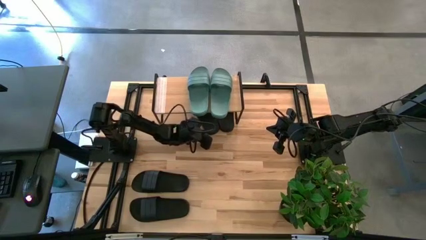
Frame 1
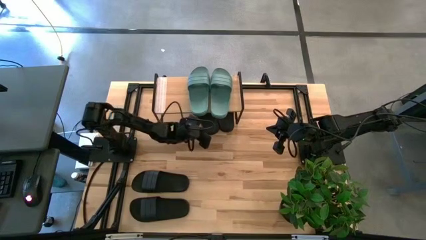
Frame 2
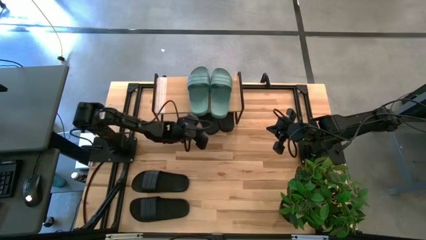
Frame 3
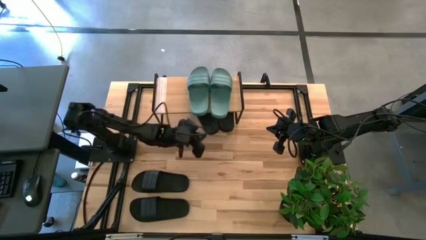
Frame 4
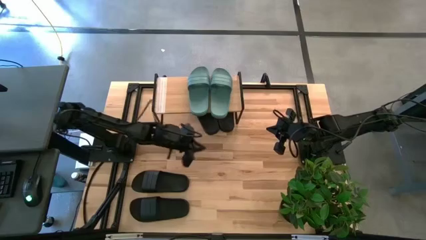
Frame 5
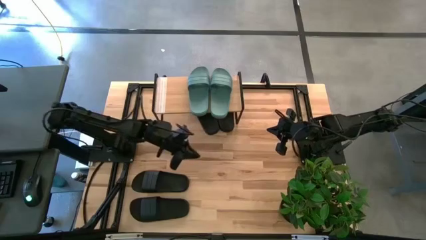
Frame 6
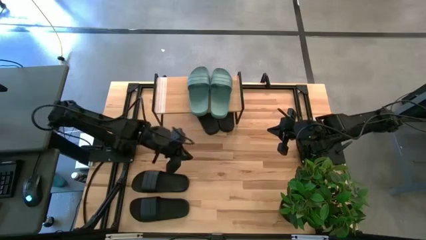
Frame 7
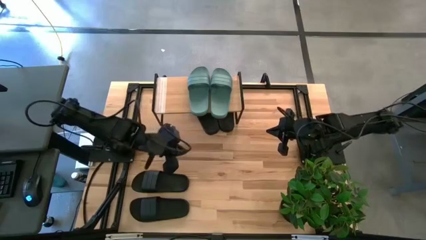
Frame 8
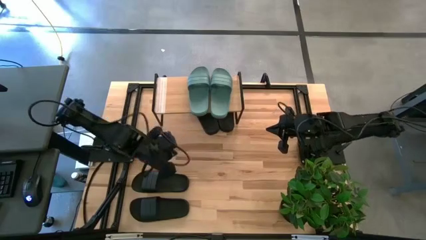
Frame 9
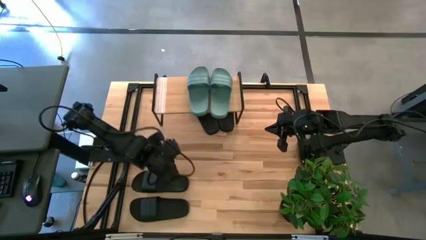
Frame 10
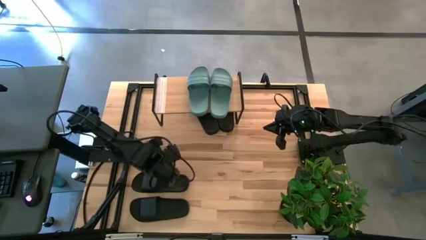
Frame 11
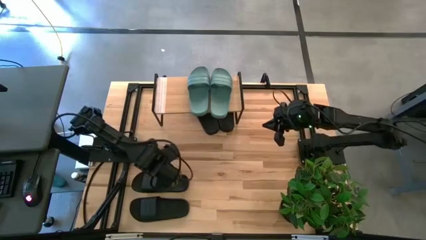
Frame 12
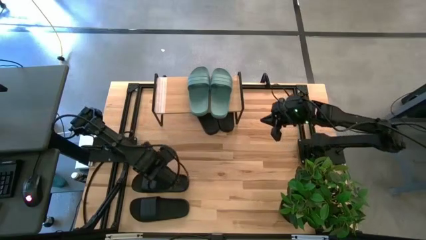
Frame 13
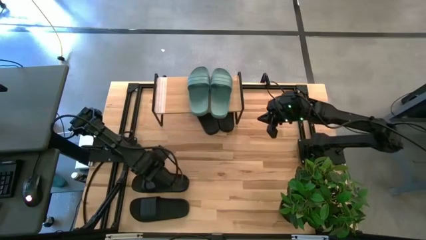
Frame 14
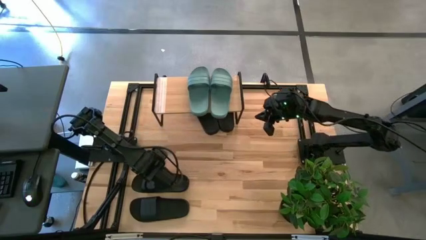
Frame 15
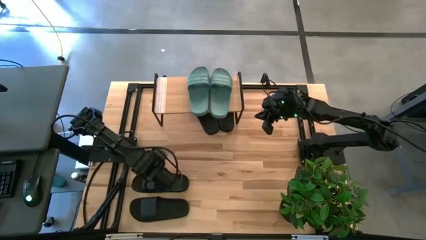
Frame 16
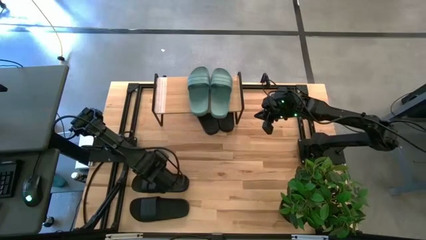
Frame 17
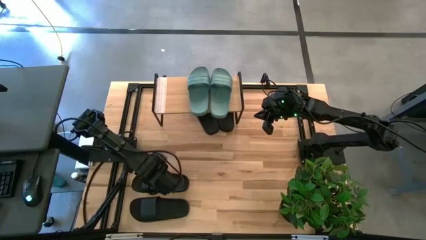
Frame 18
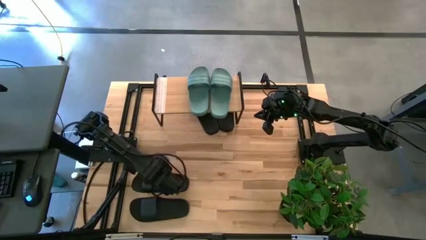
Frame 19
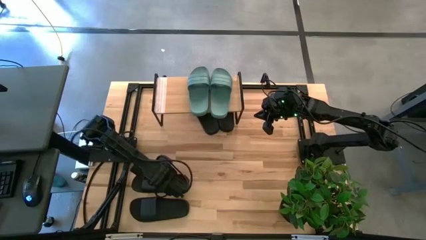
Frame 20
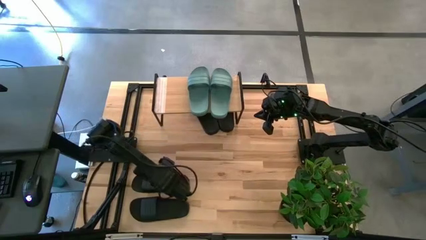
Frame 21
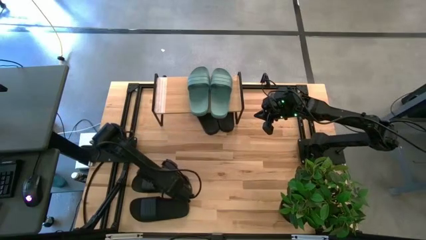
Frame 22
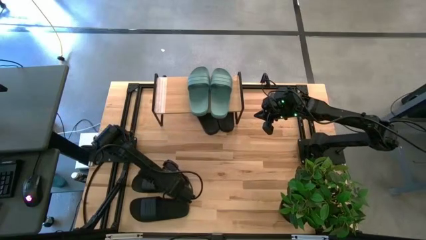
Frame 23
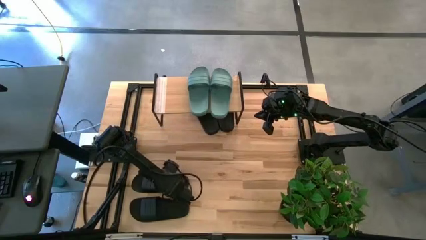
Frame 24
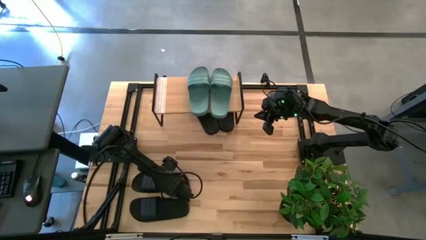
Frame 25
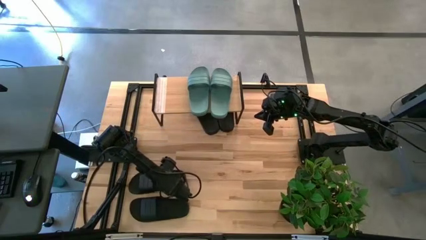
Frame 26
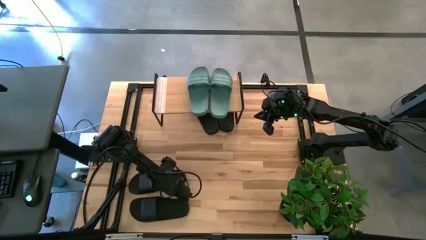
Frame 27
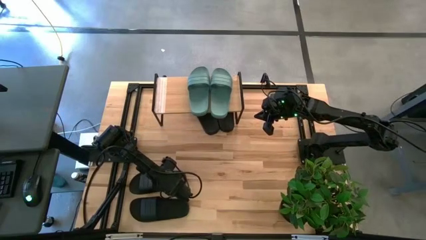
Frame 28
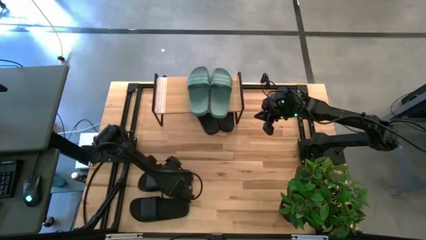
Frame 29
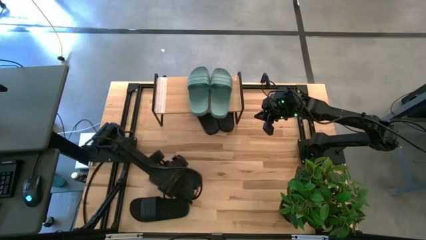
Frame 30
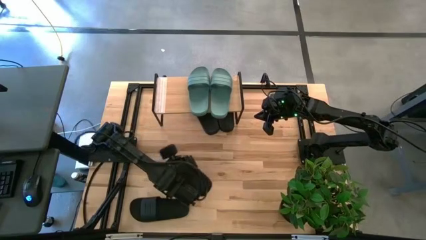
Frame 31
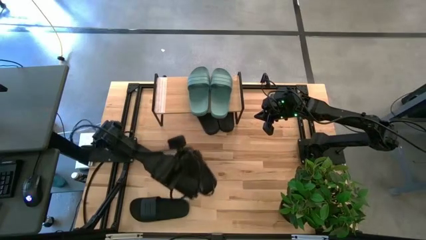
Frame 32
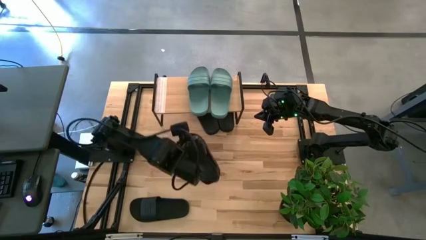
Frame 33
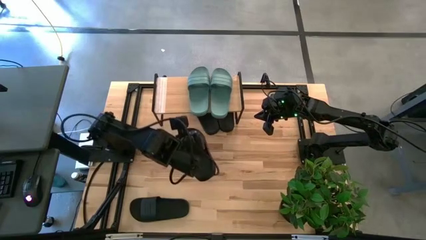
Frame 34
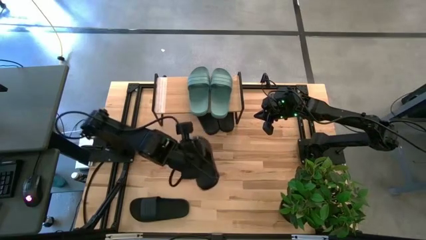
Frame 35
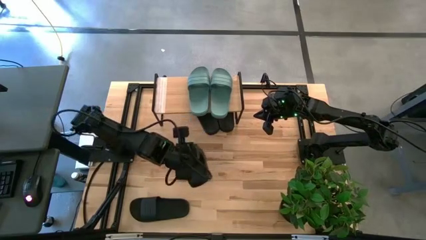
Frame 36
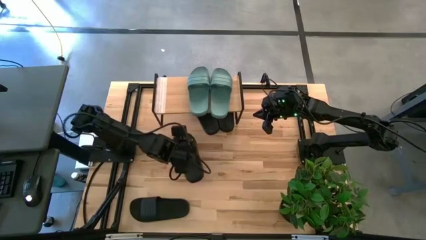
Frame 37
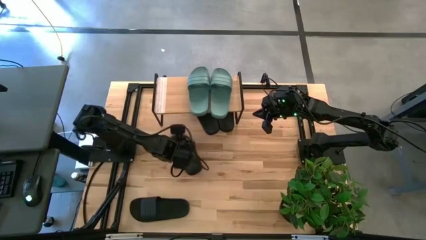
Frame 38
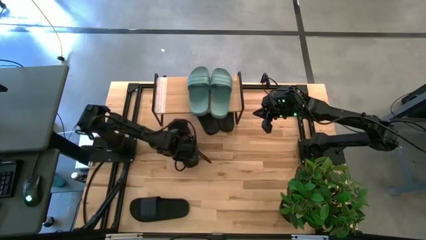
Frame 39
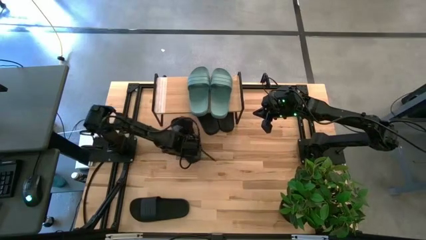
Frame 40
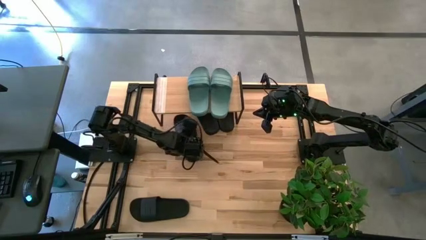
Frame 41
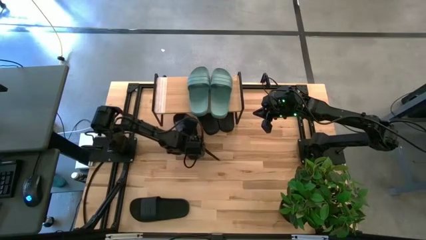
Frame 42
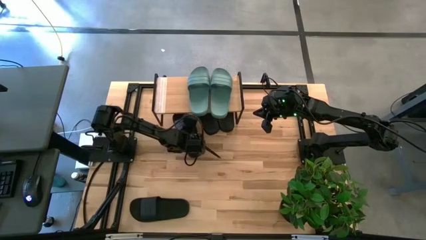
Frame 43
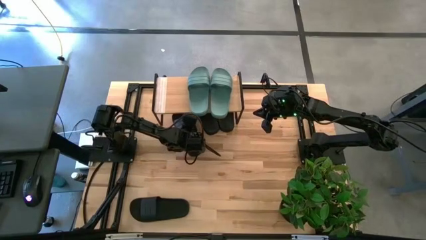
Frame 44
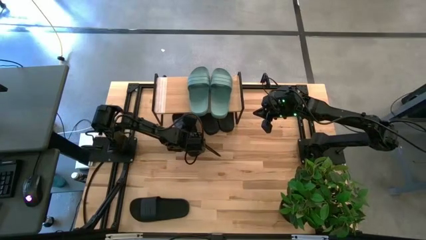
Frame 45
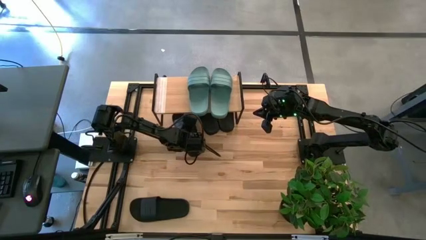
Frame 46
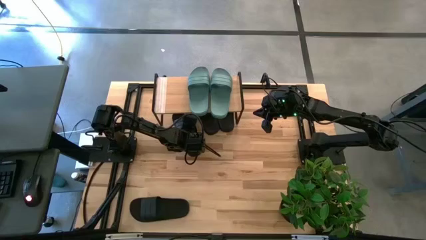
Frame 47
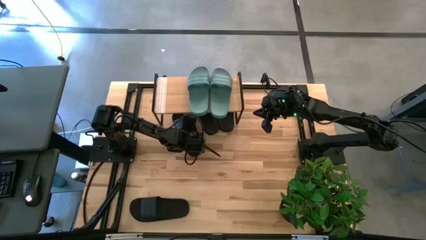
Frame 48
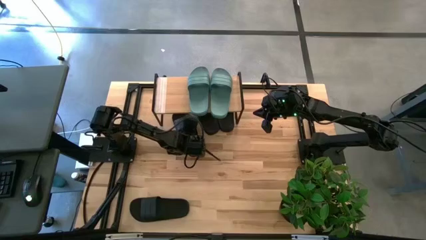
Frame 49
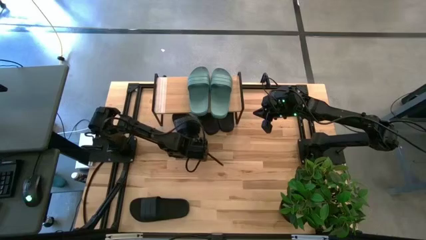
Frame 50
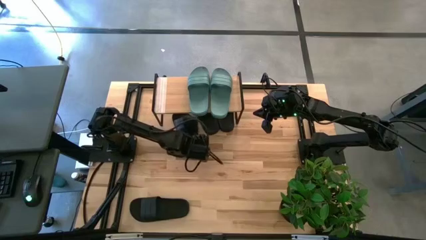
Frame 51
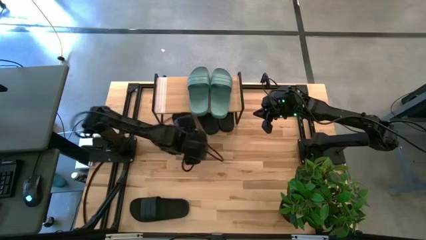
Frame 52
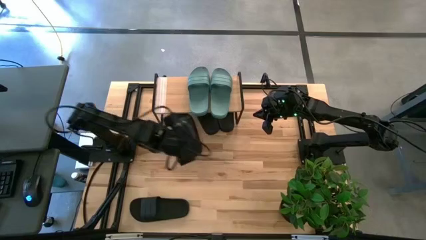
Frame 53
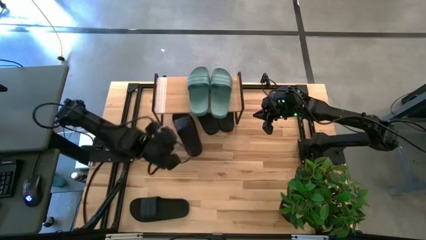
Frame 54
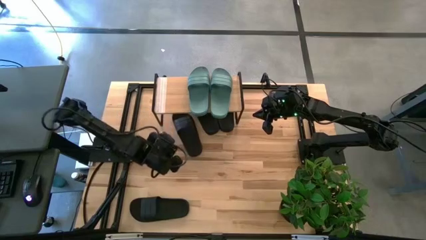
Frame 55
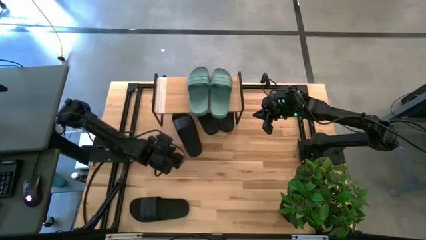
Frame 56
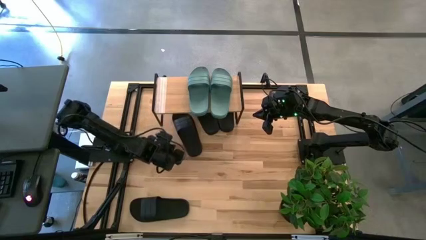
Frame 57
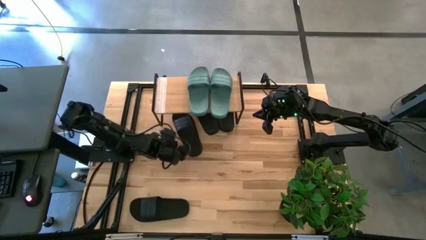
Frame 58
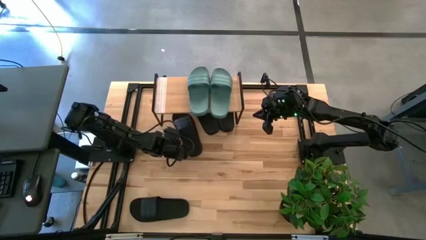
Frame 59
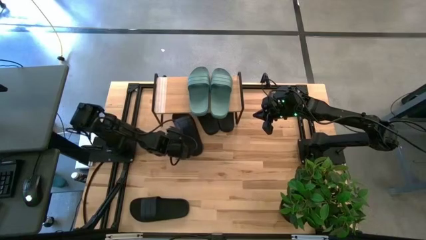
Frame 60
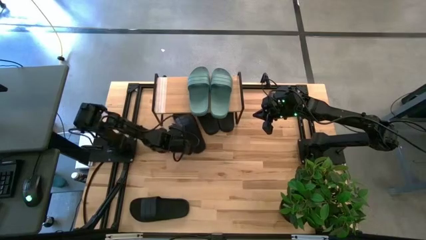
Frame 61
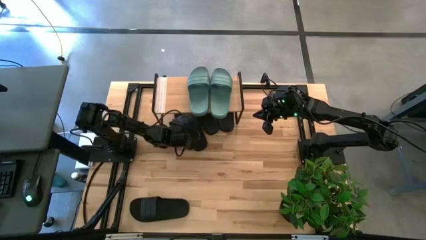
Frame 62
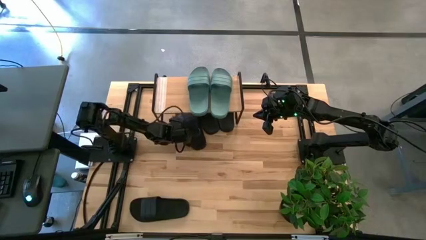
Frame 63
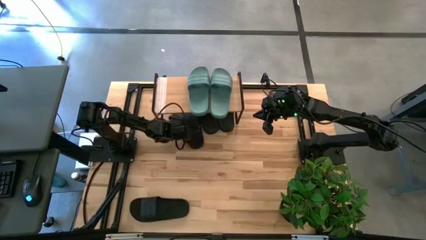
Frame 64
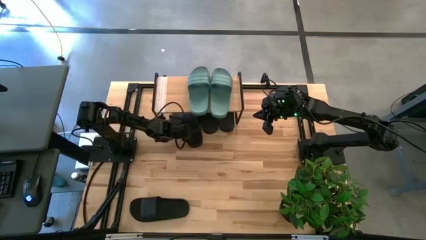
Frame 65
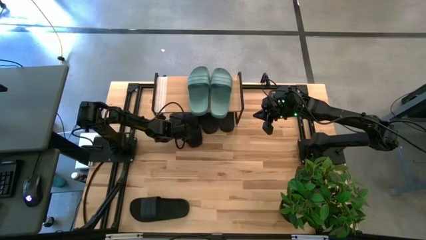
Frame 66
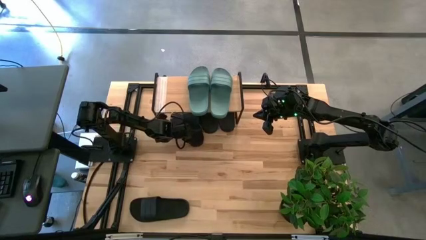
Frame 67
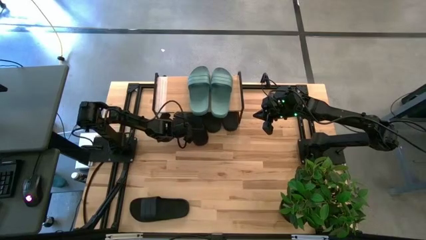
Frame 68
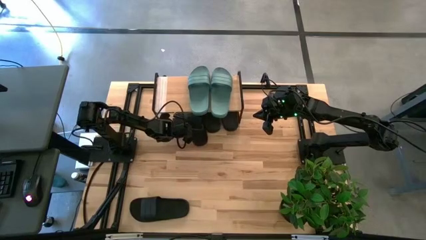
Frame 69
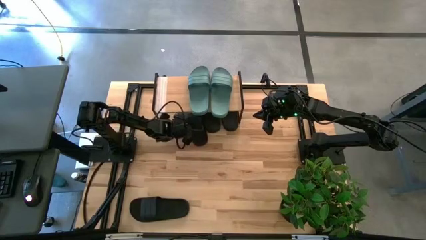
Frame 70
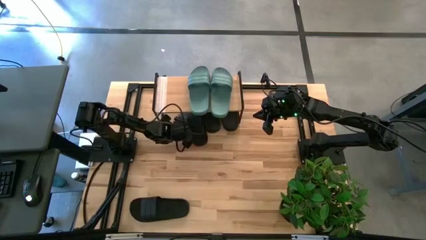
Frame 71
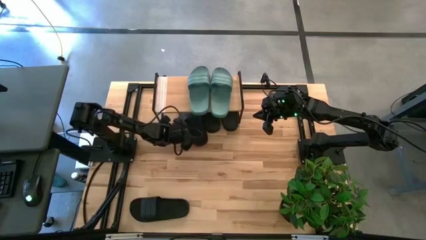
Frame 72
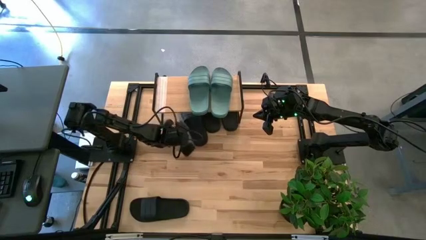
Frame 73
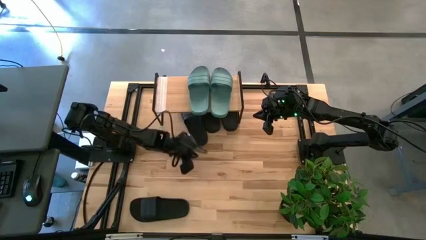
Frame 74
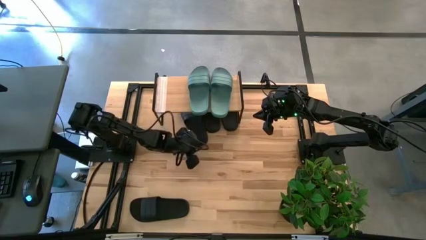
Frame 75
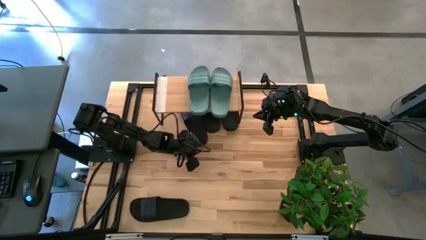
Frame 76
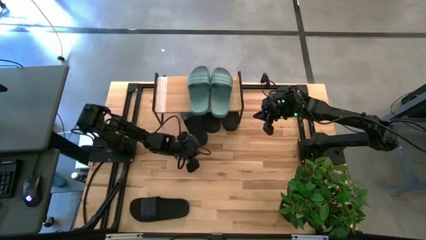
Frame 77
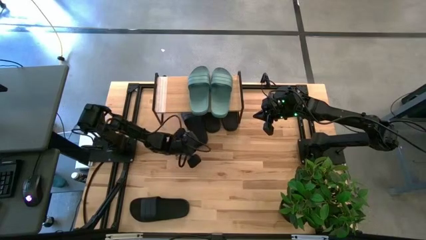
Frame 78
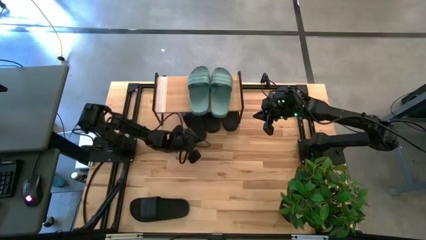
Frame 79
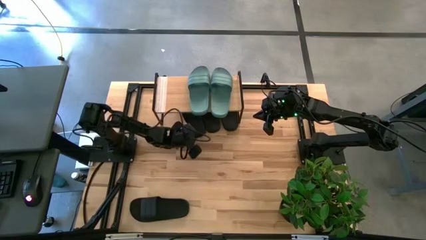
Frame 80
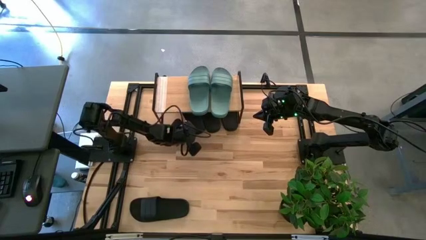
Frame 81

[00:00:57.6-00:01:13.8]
Task: Pick and place slides into the shelf
Put the black slide under the shelf
